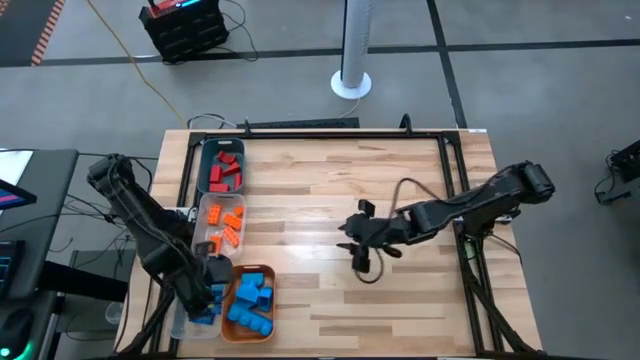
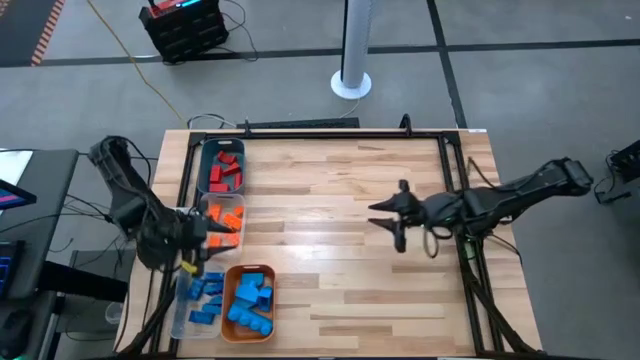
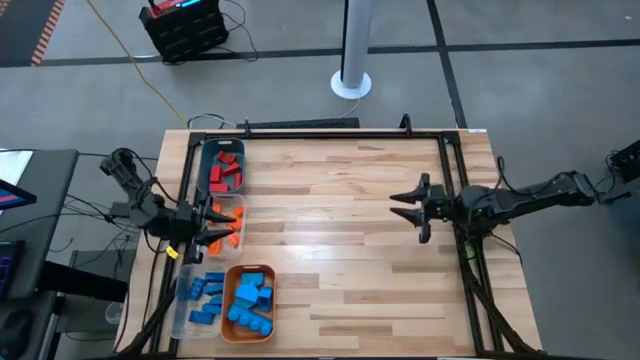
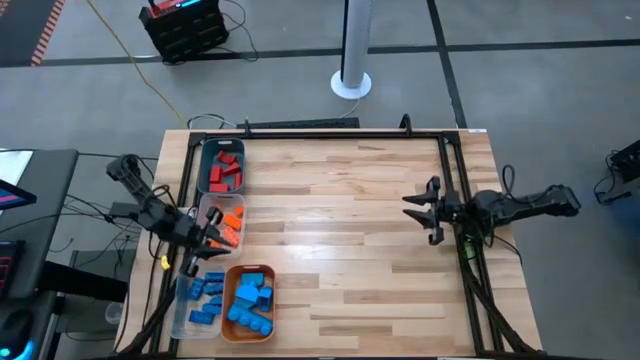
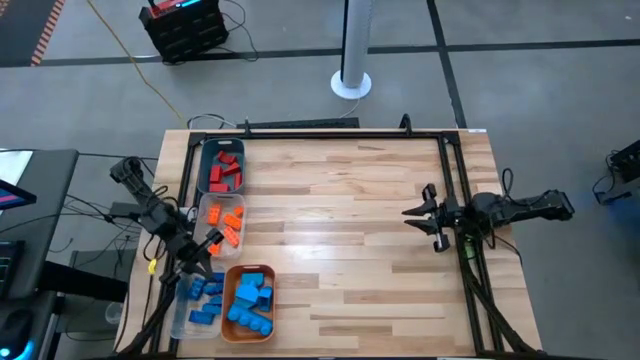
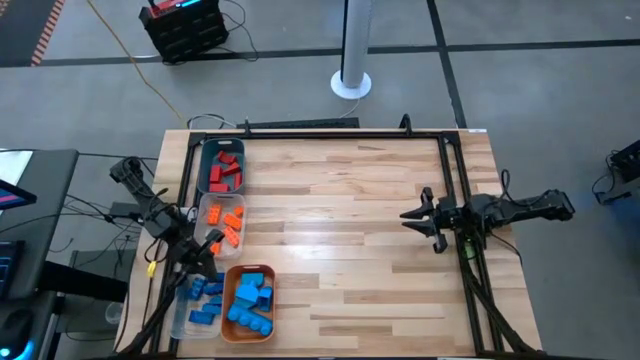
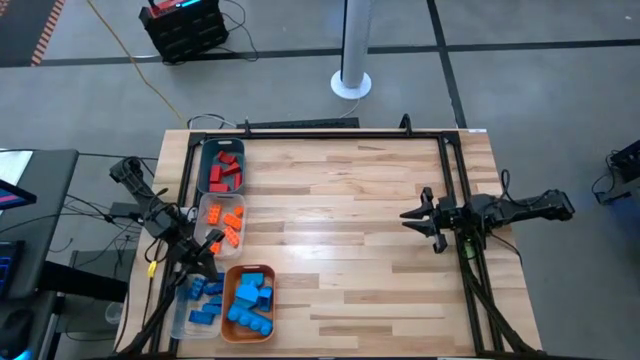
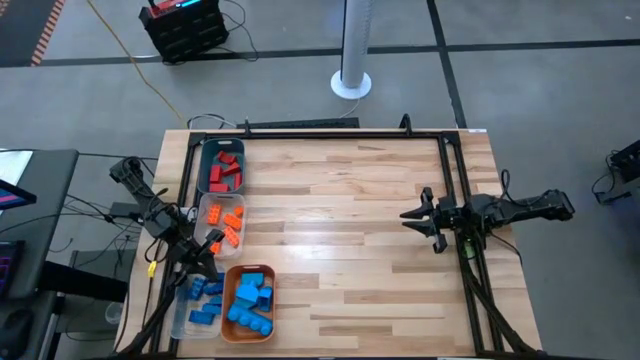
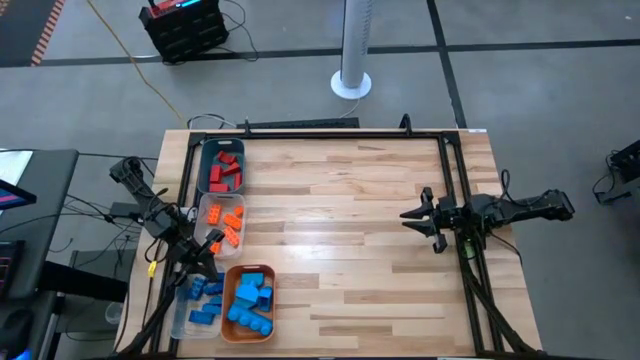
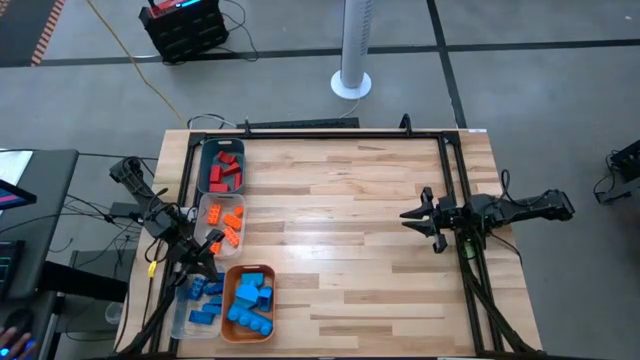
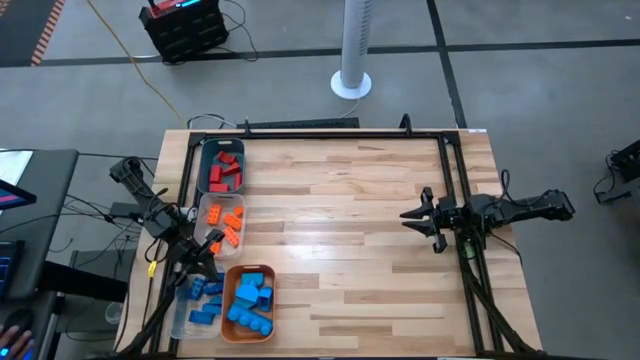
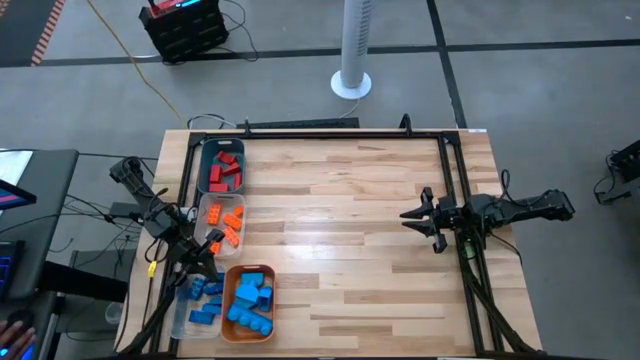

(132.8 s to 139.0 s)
Task: Sort blocks
Return to Home Position

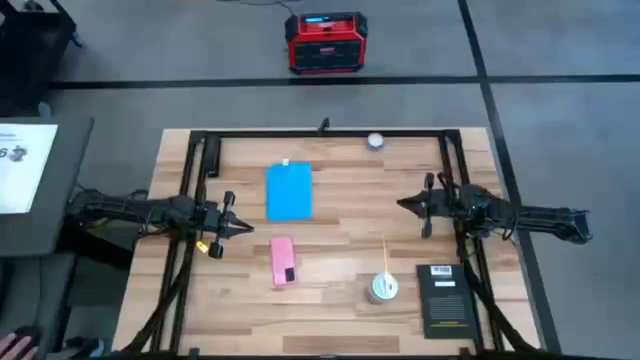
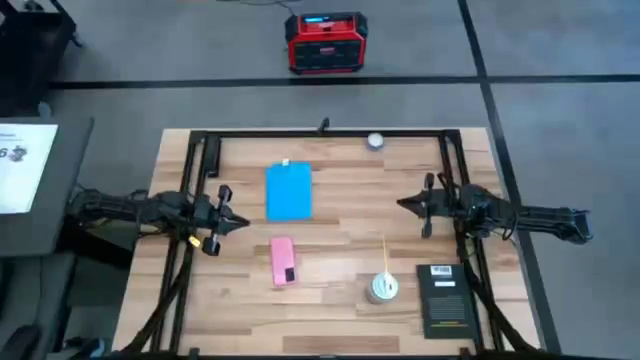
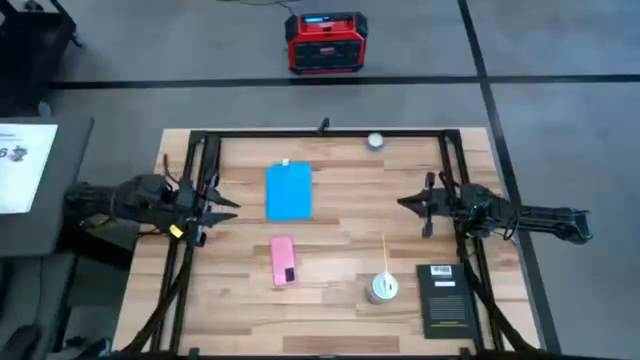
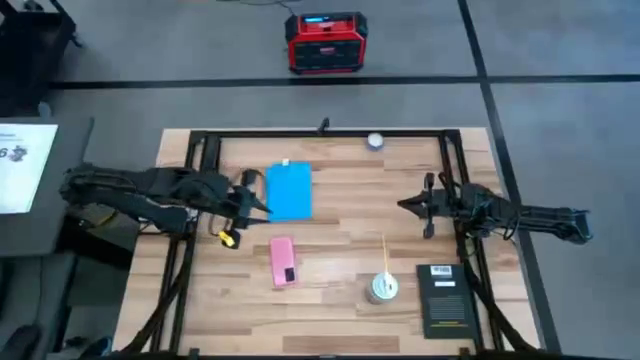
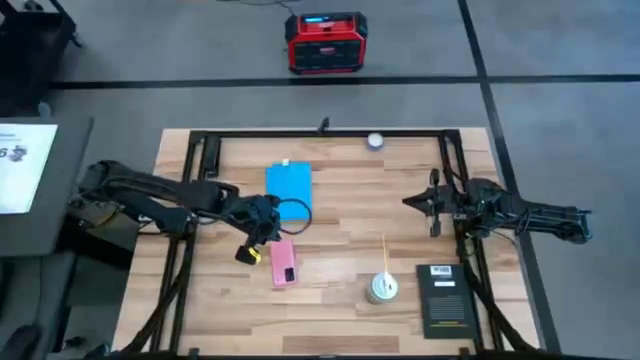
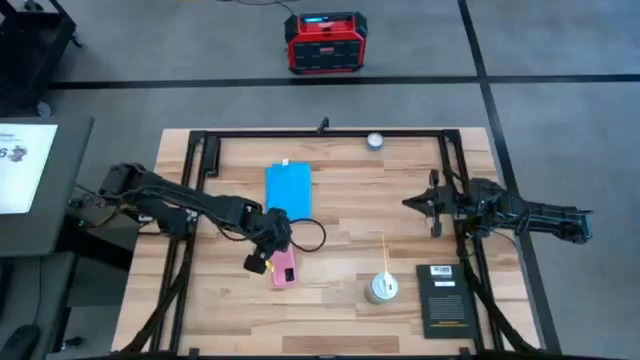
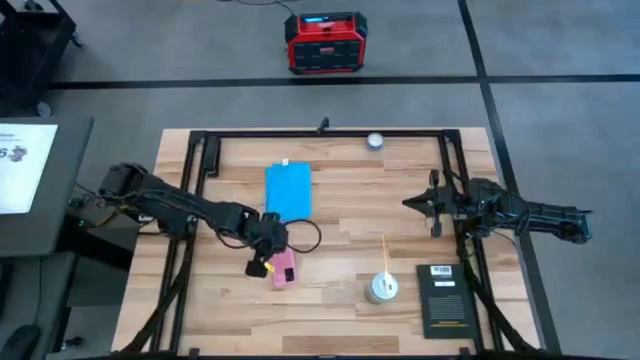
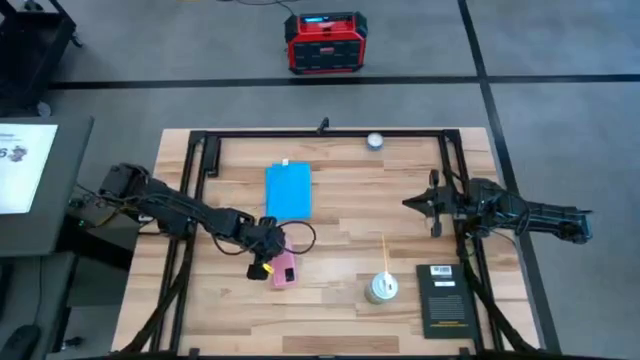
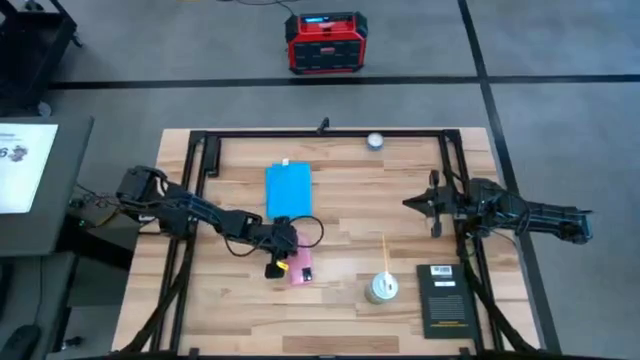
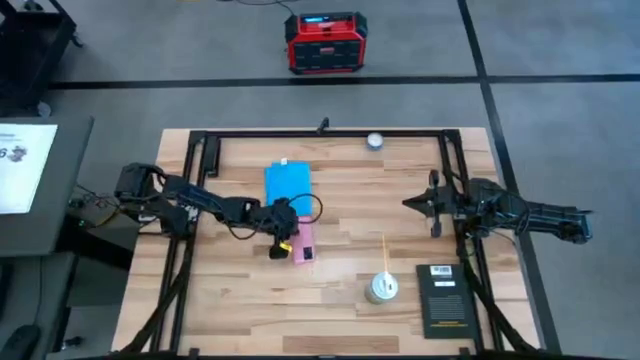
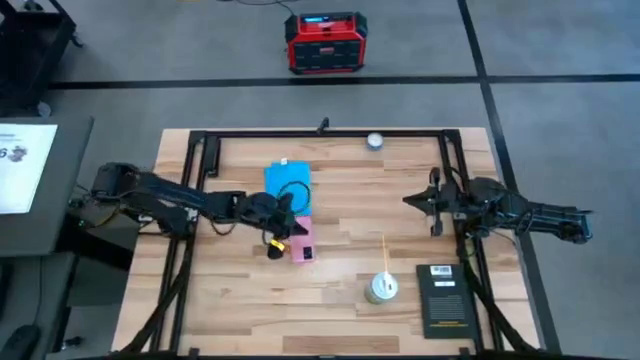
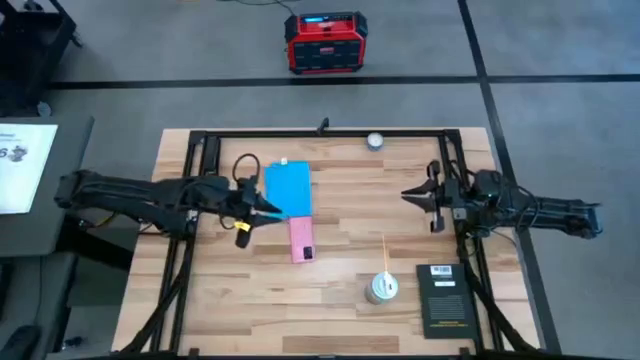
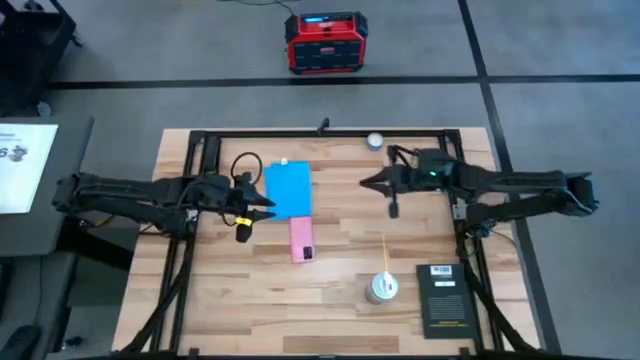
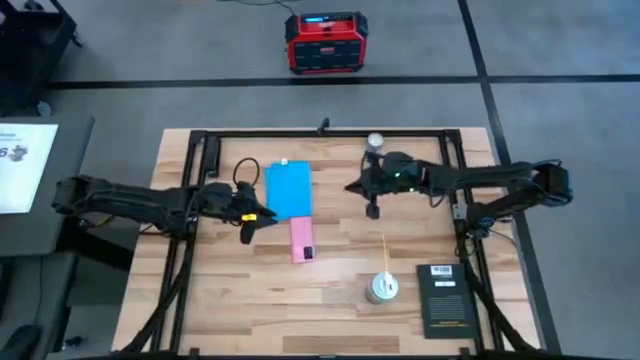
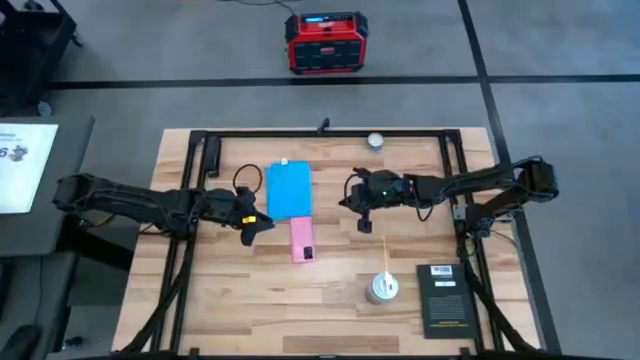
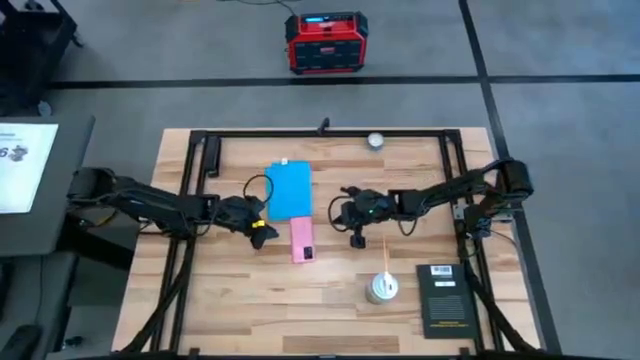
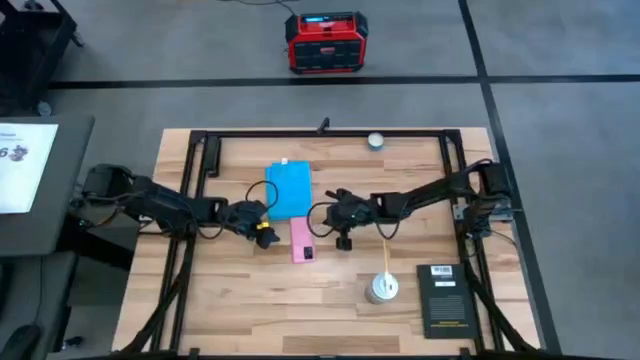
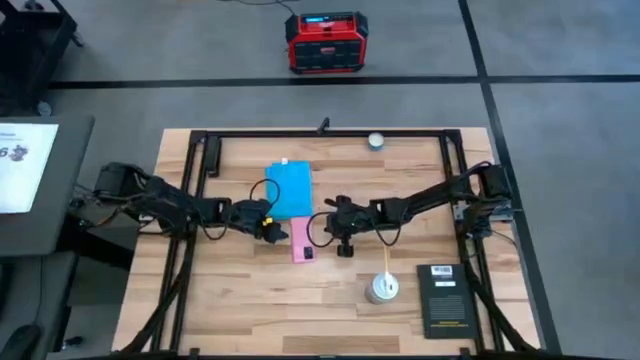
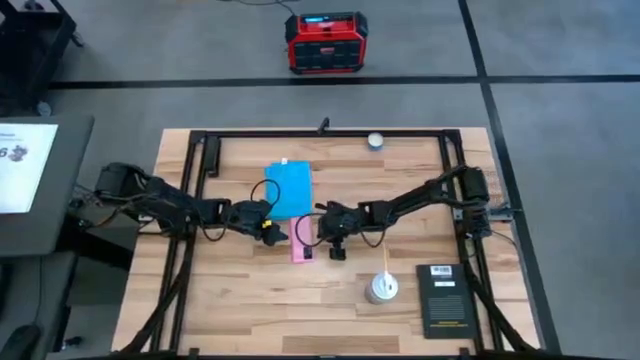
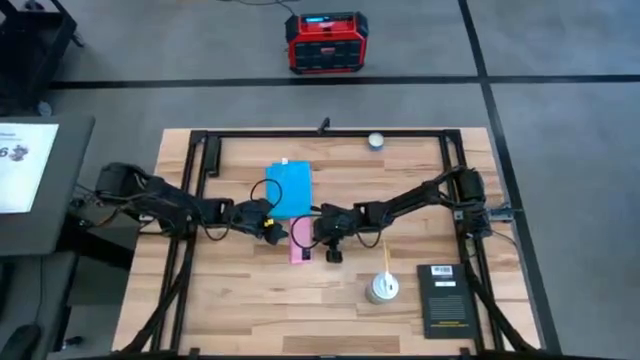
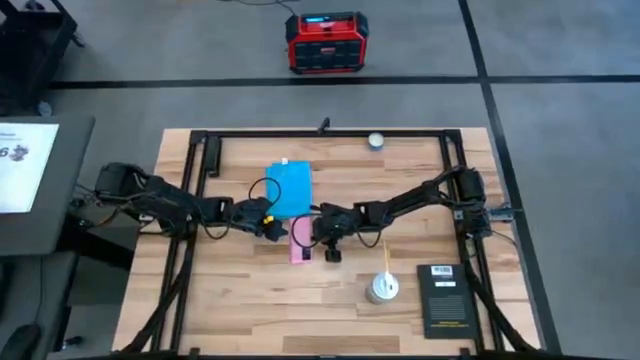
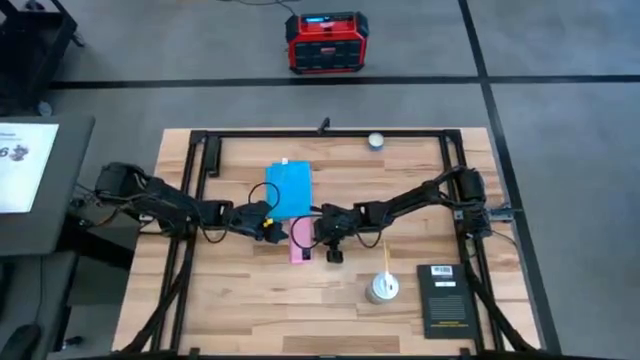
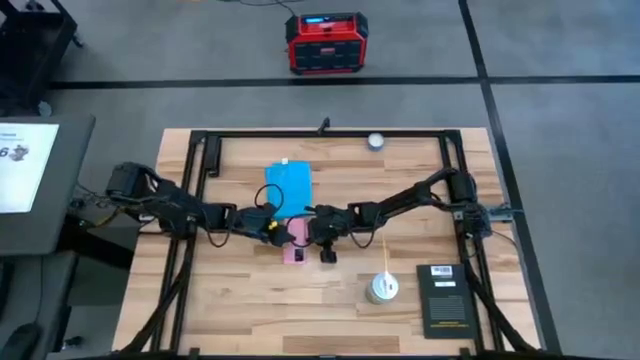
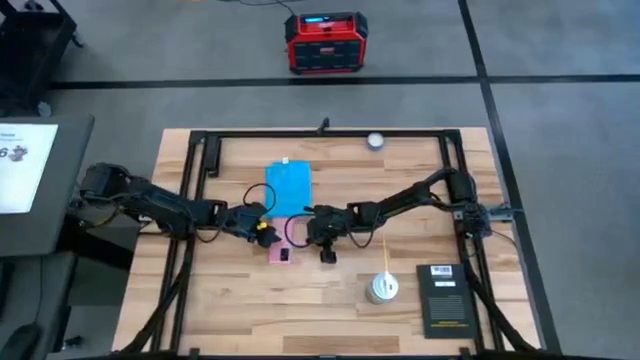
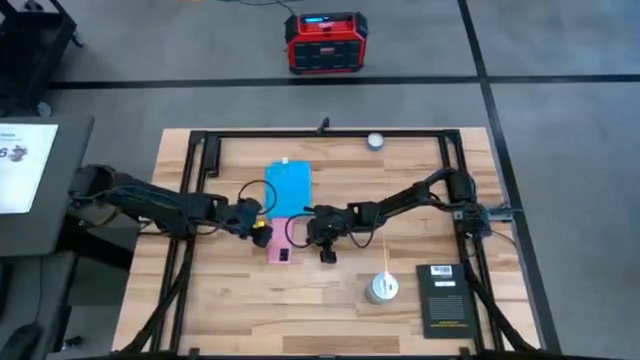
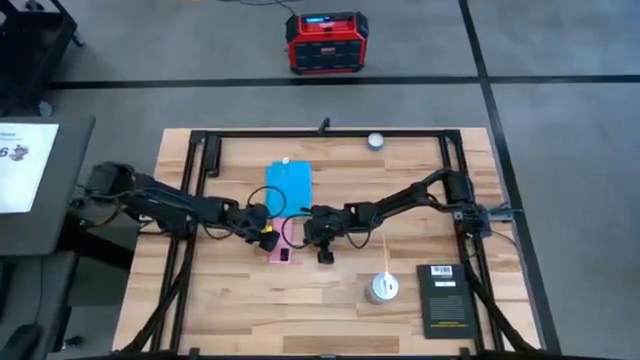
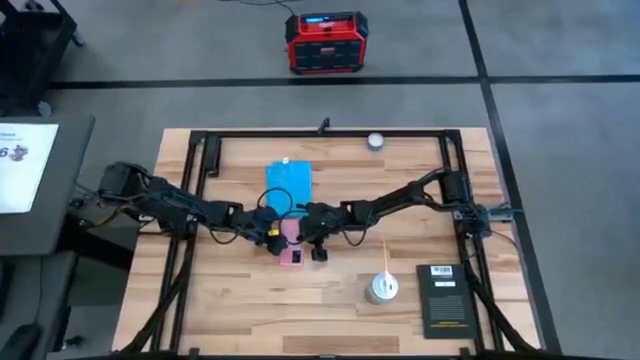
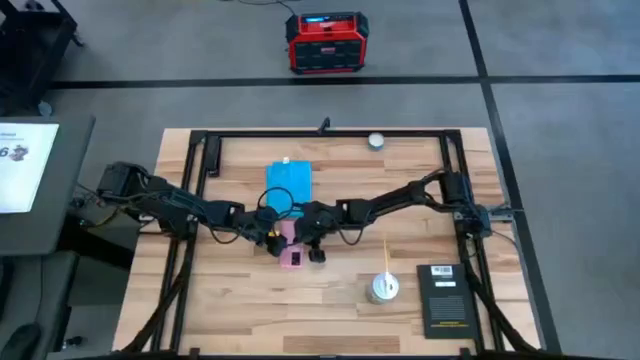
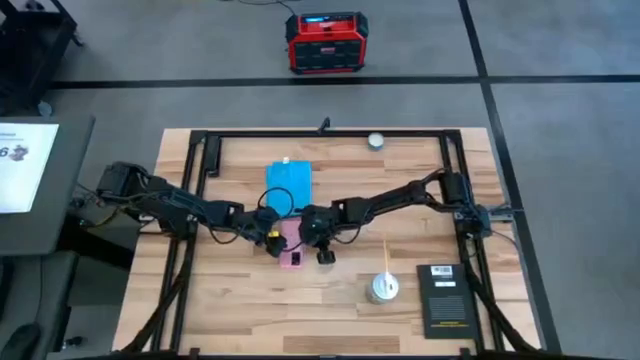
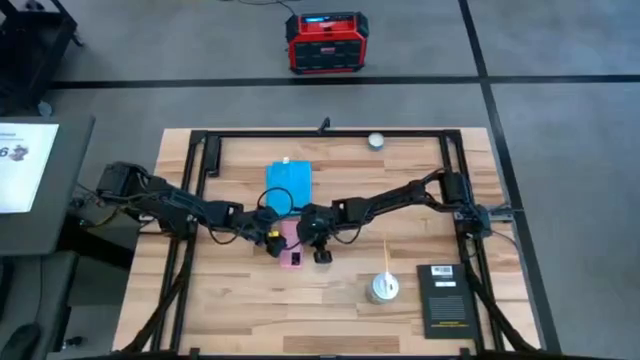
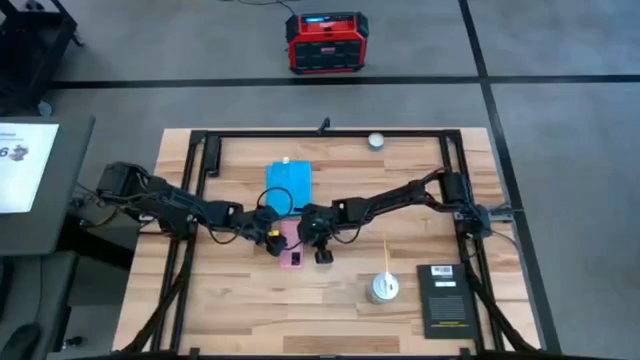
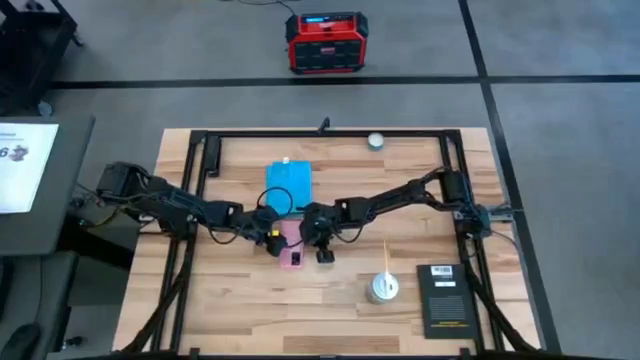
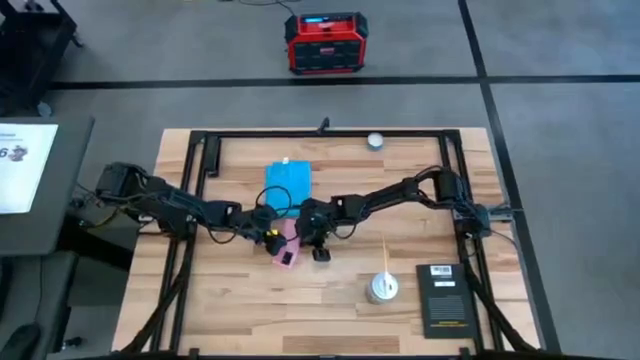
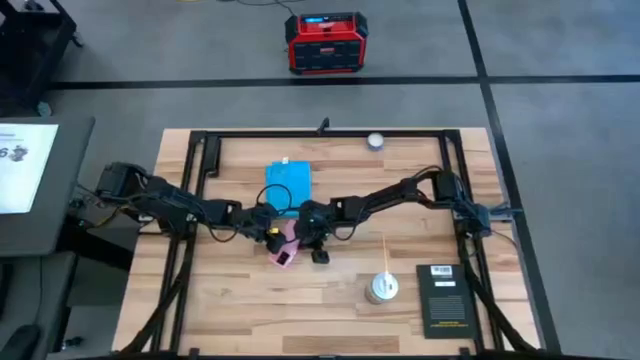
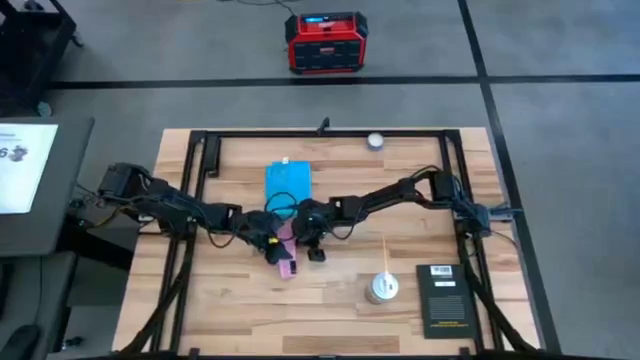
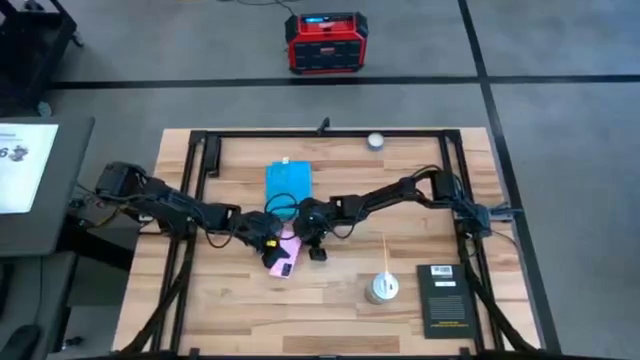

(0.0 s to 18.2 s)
Task: Apply microfiber cloth
Spray the device using the spray bottle
